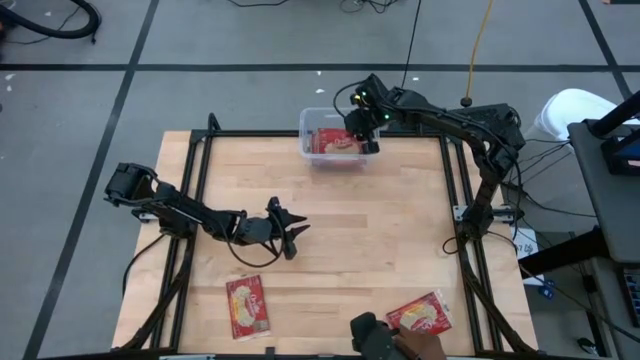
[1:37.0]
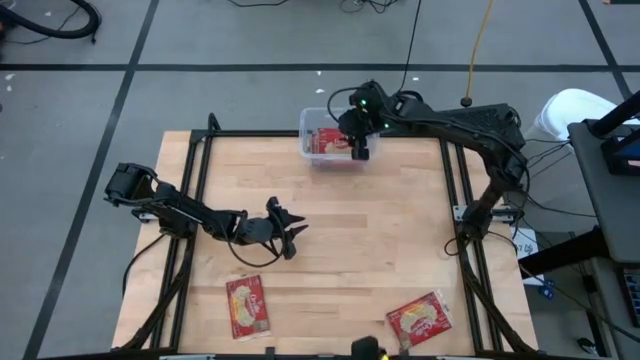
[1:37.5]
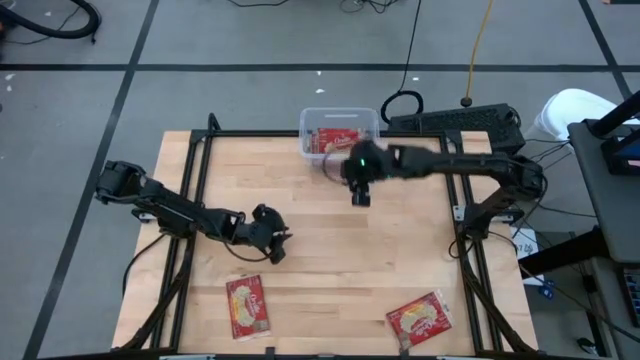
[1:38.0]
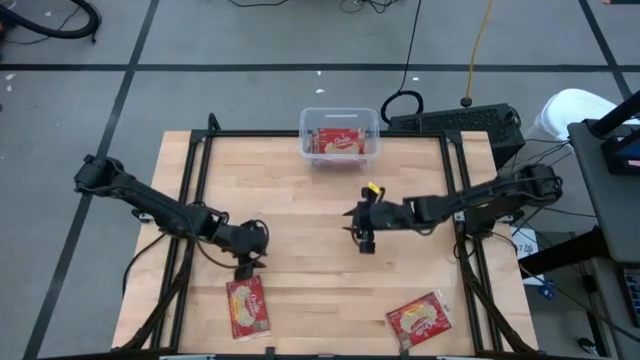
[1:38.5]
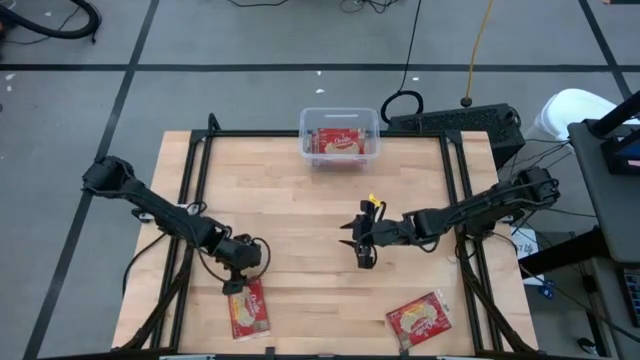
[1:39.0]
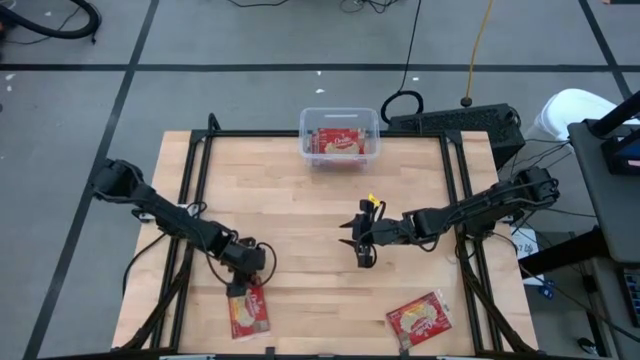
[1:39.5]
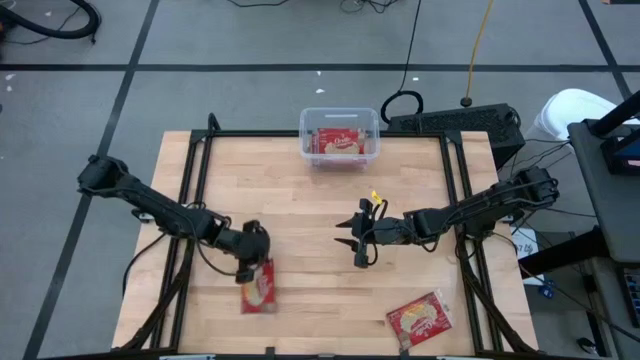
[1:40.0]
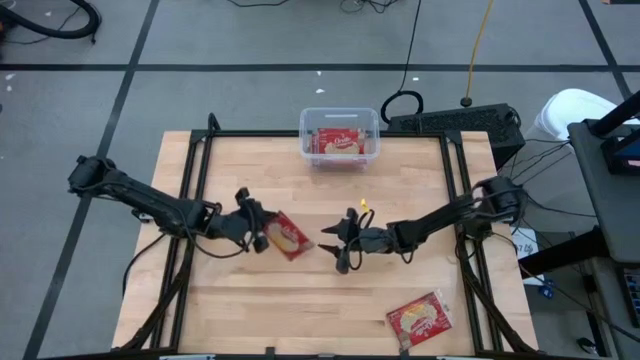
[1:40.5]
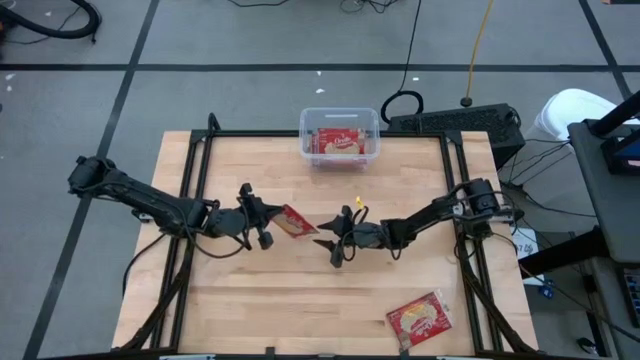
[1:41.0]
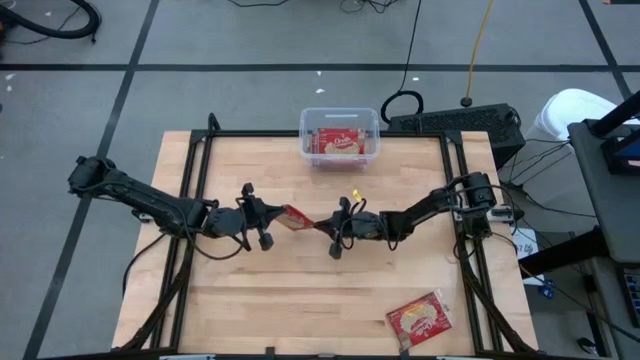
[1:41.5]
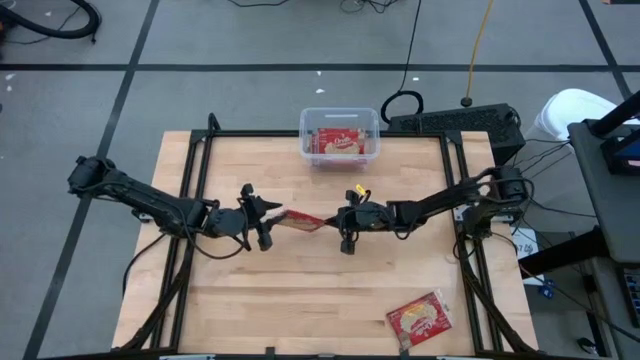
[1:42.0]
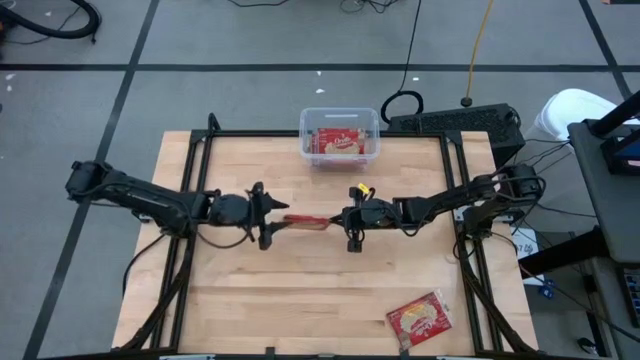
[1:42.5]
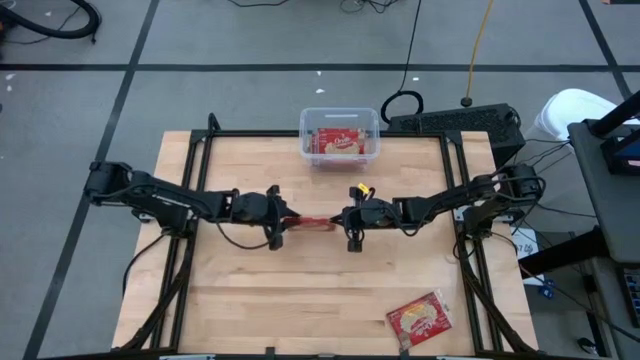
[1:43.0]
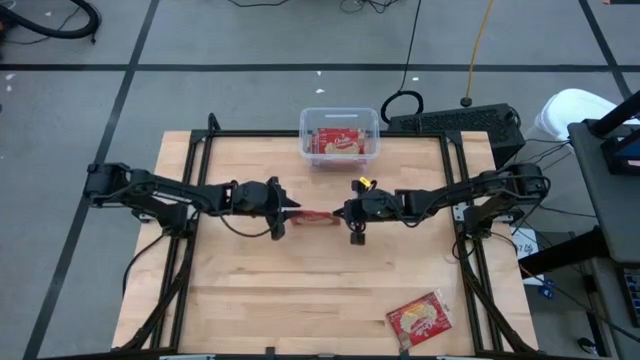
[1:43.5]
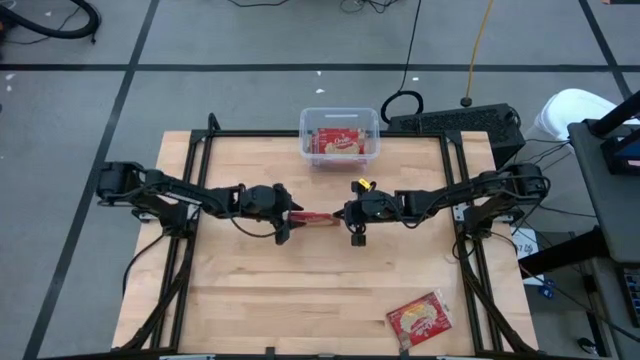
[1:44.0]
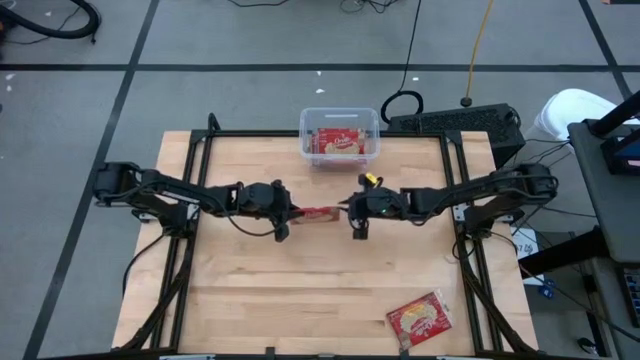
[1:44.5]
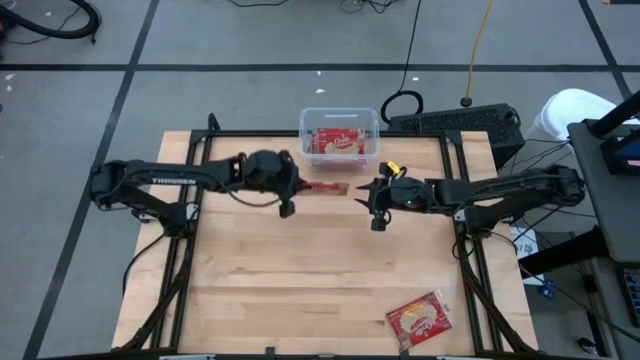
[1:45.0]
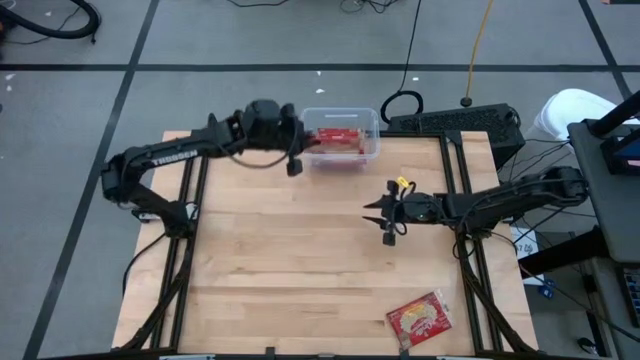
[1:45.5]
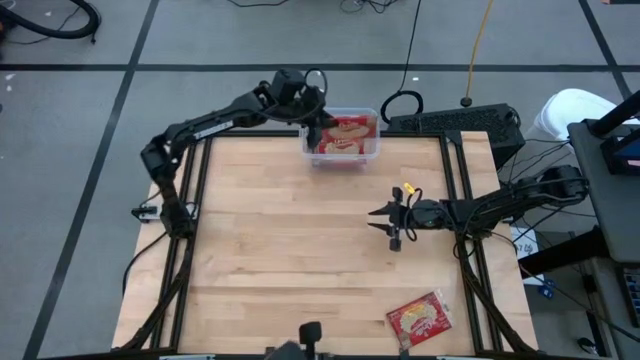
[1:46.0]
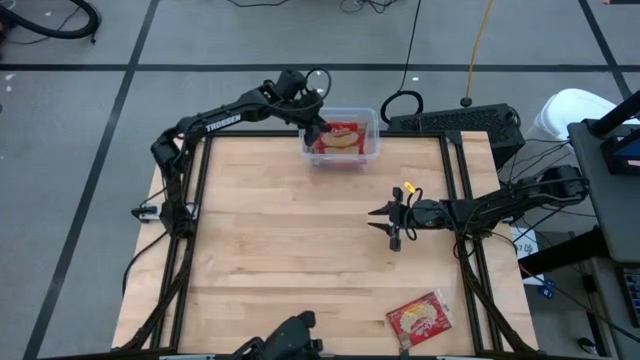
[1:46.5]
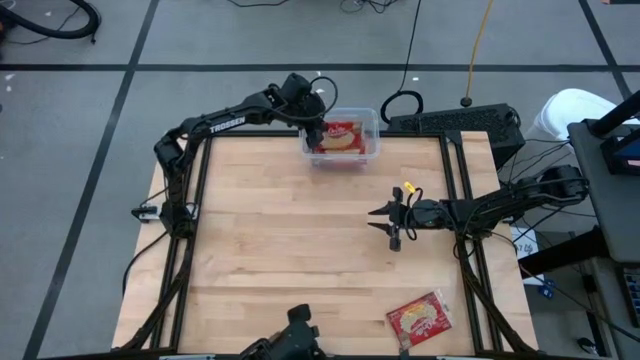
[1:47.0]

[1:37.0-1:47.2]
Task: Sort popcorn bags into baskets
Put the popcorn bags into the transparent bin

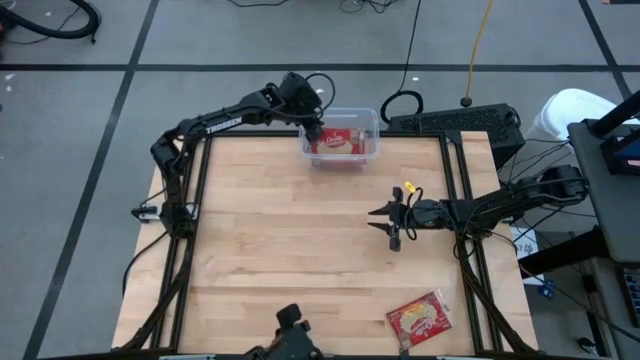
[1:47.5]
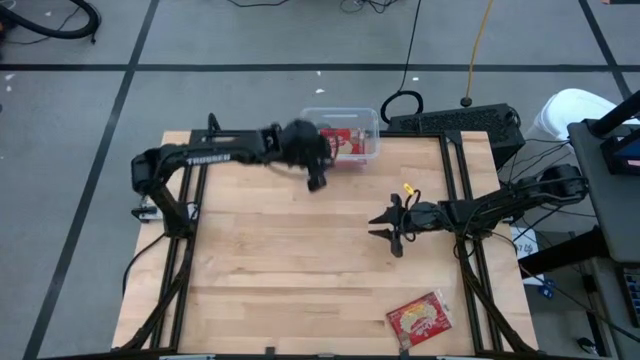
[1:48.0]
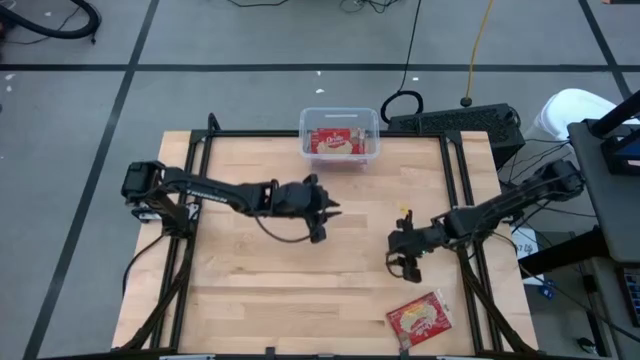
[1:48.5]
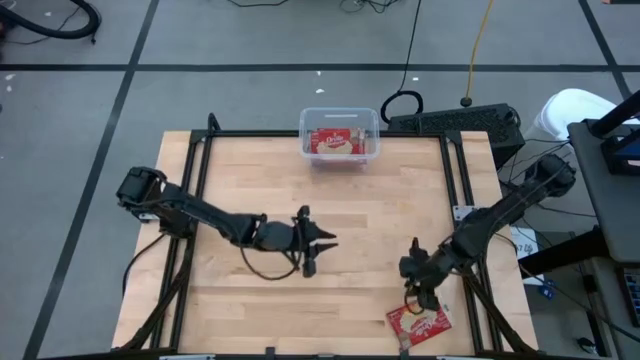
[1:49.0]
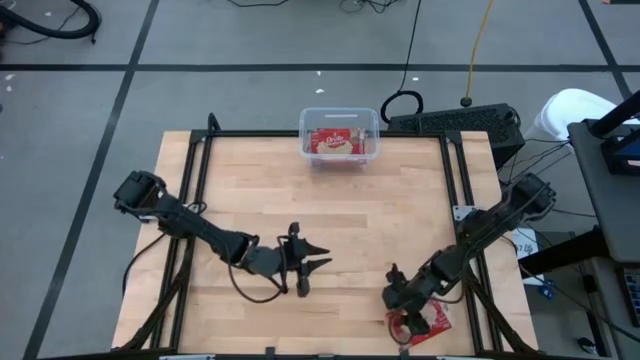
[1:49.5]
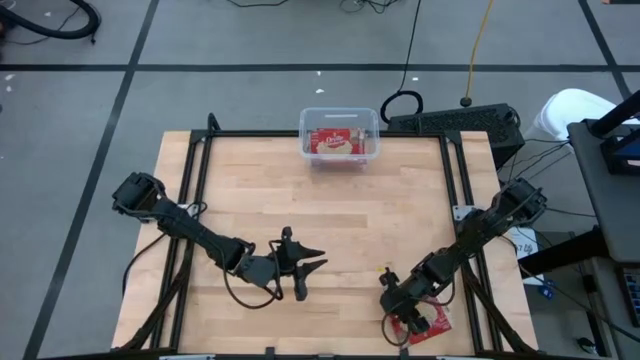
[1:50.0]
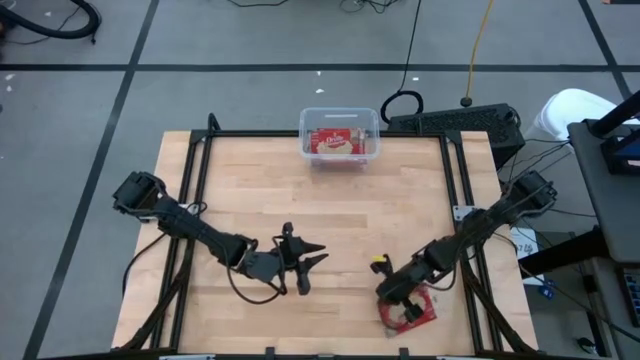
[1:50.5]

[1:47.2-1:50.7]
Put the popcorn bags into the transparent bin

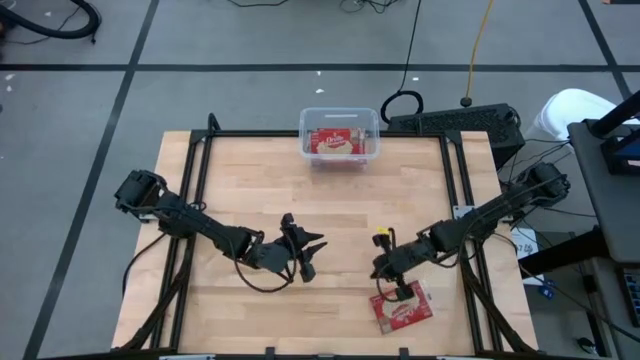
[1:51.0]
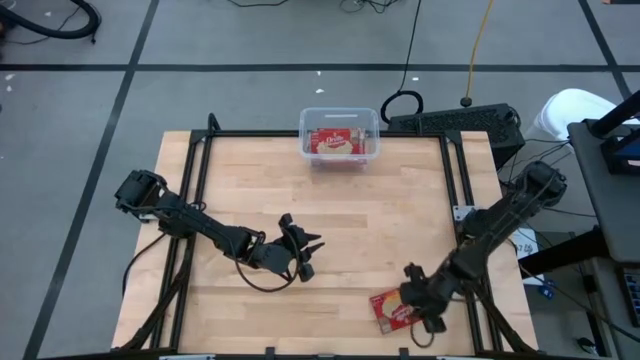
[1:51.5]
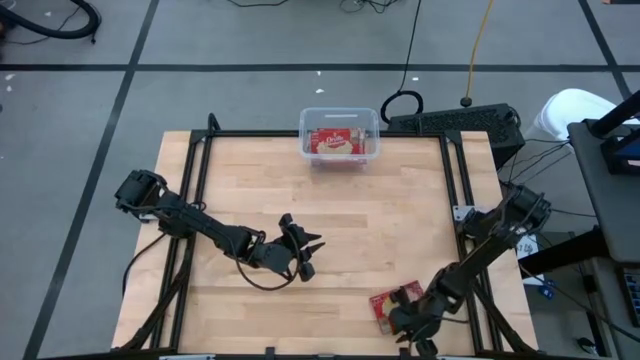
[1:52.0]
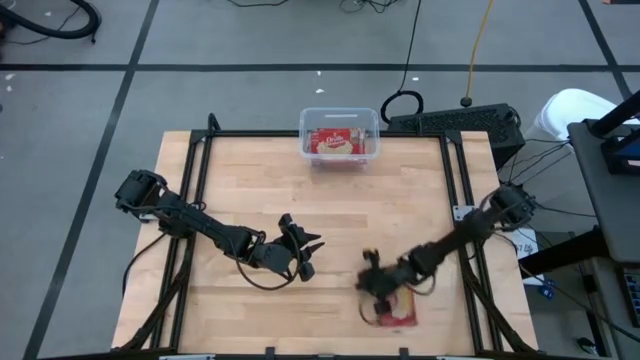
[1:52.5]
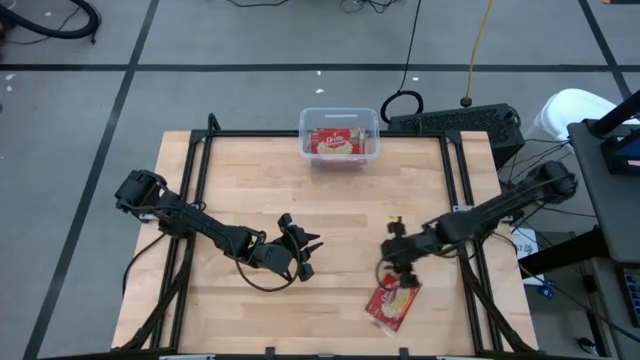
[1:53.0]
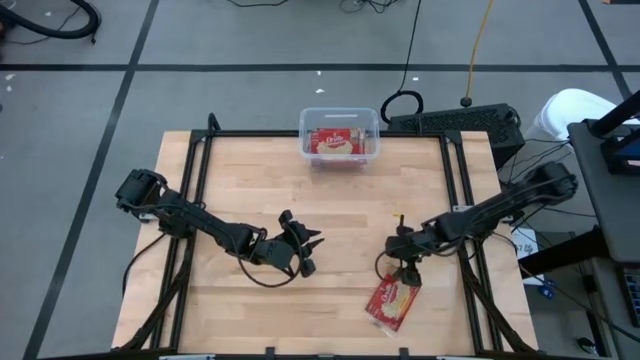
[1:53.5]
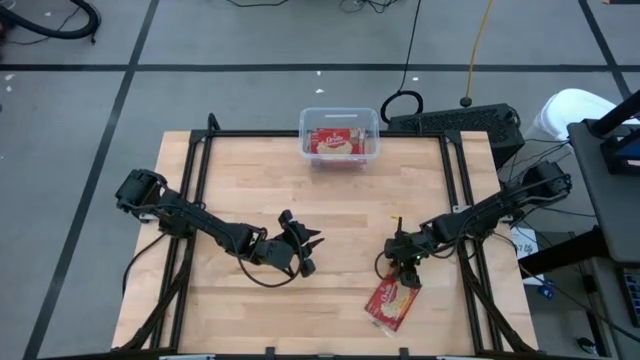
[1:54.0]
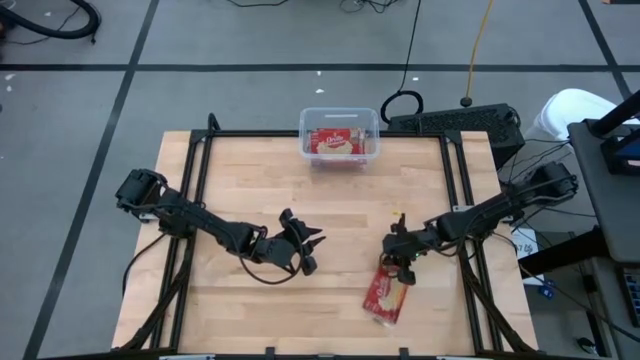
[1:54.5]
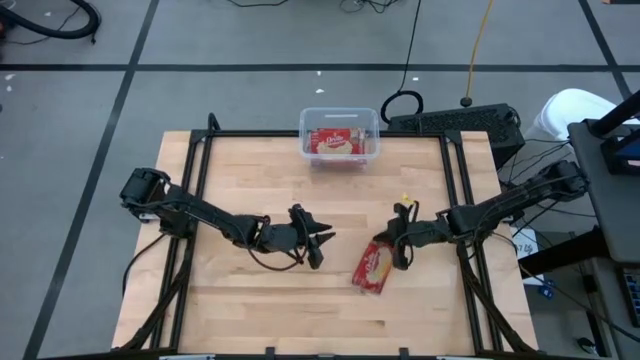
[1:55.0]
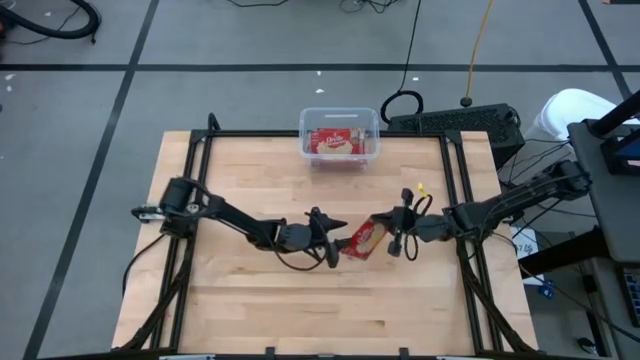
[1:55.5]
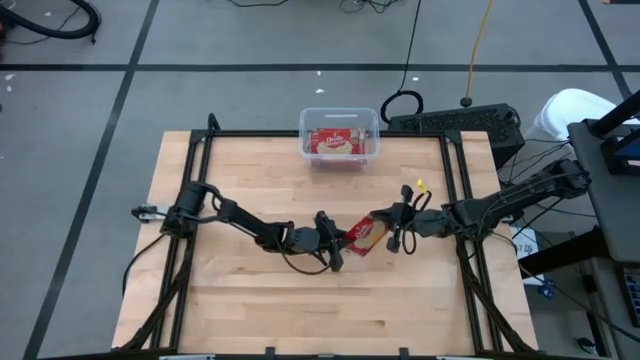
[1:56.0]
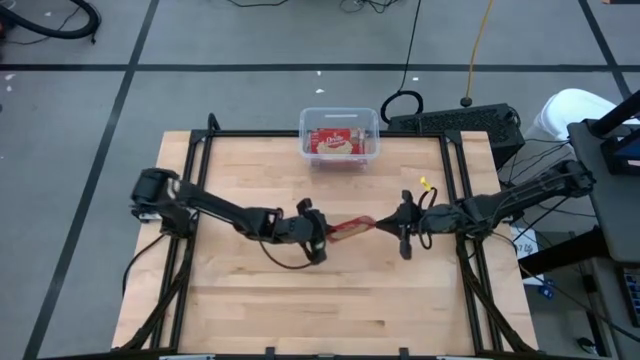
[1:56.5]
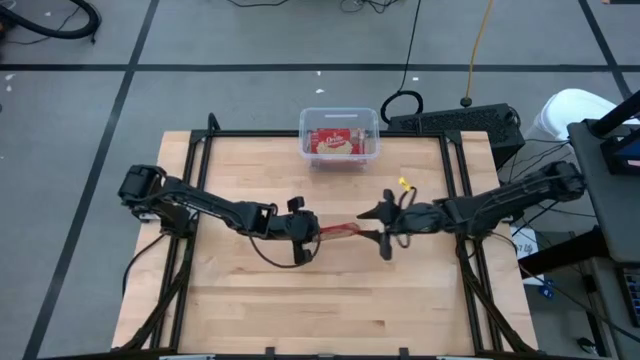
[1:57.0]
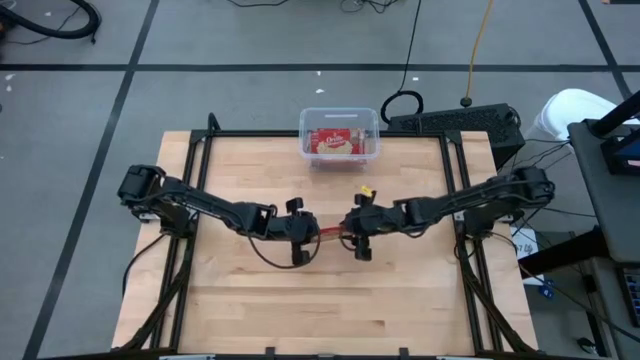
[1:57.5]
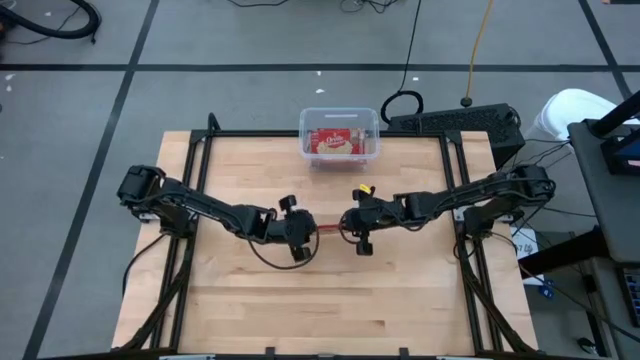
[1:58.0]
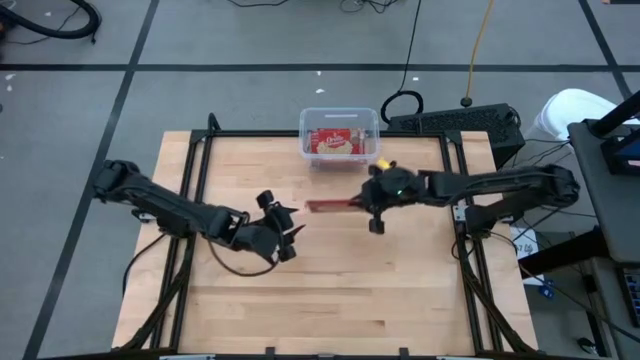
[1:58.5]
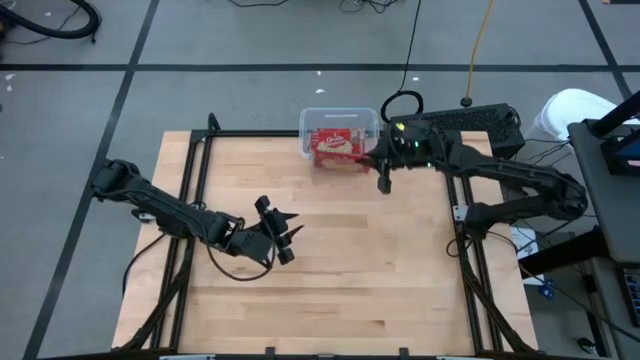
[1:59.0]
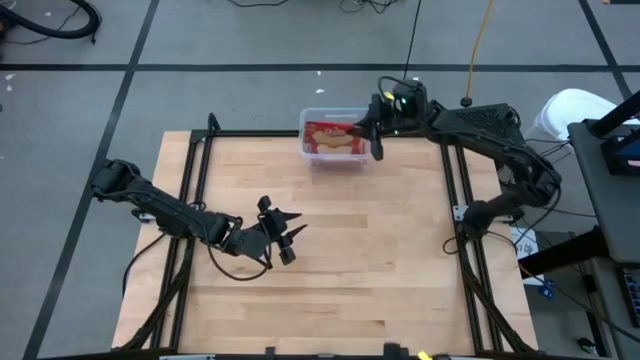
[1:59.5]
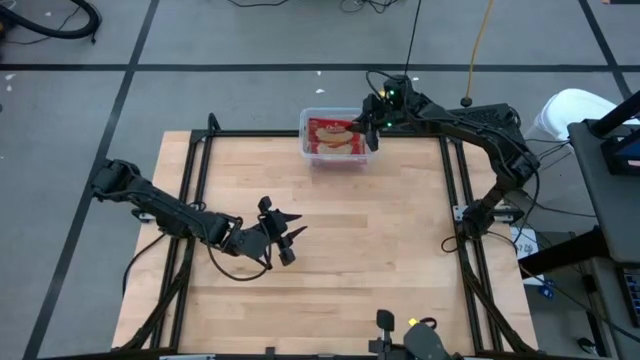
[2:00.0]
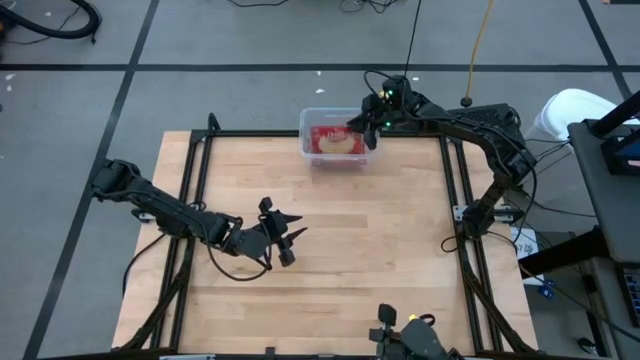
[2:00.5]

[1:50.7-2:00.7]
Put the popcorn bags into the transparent bin
